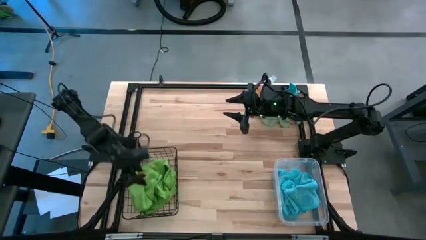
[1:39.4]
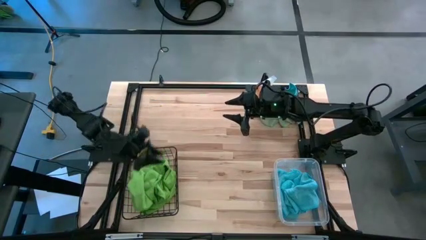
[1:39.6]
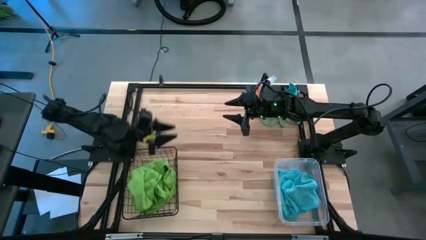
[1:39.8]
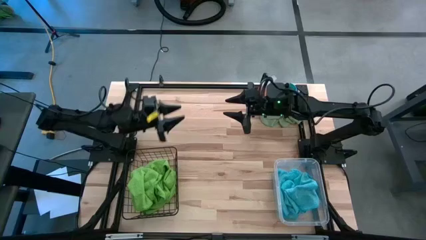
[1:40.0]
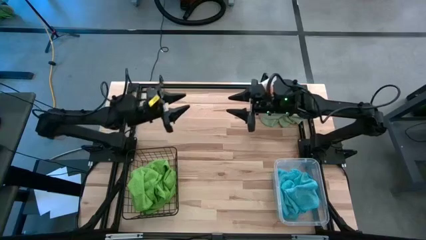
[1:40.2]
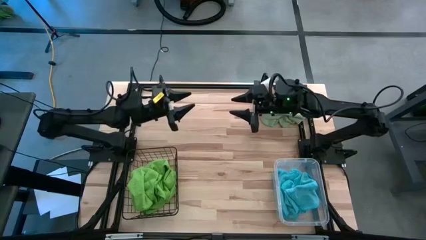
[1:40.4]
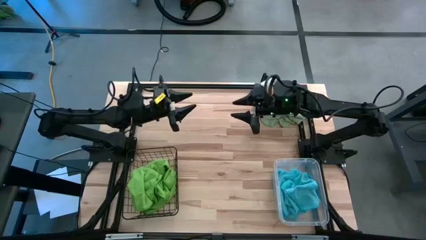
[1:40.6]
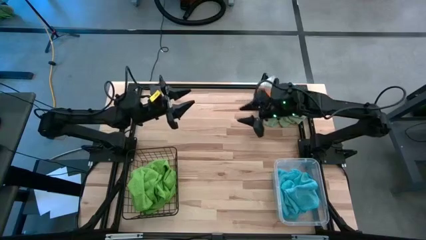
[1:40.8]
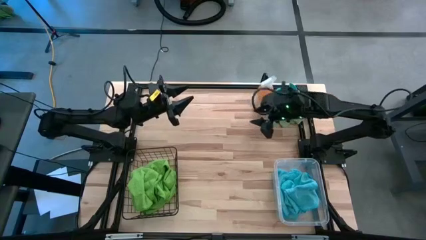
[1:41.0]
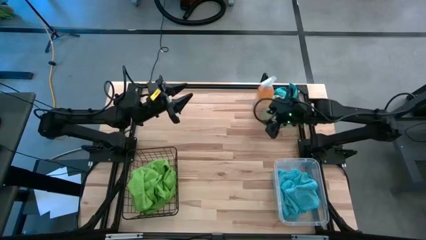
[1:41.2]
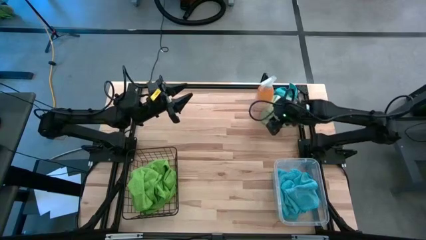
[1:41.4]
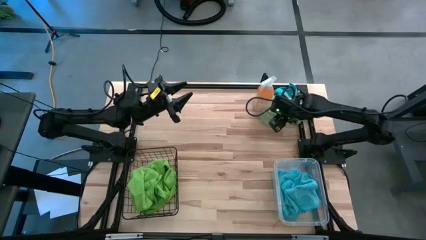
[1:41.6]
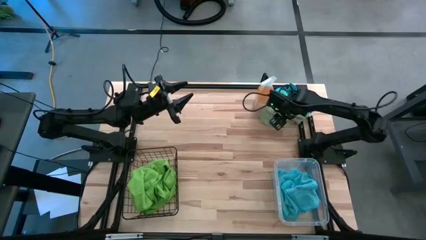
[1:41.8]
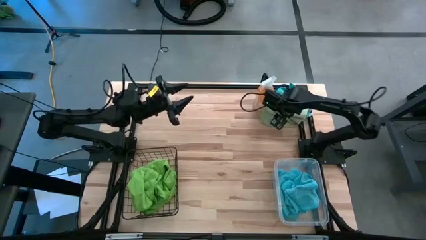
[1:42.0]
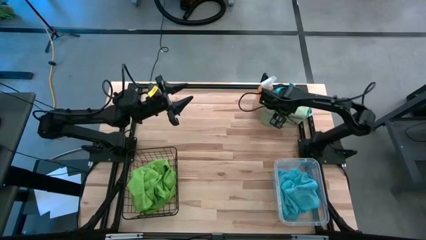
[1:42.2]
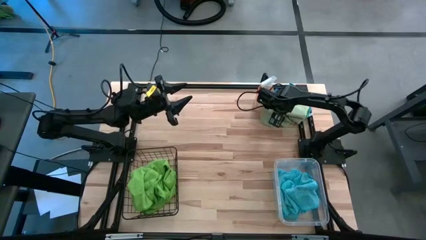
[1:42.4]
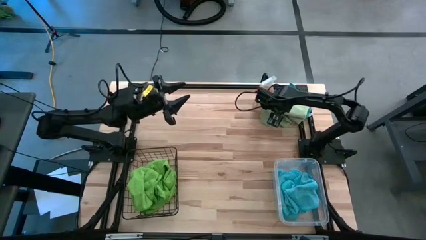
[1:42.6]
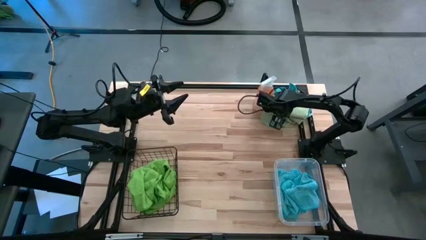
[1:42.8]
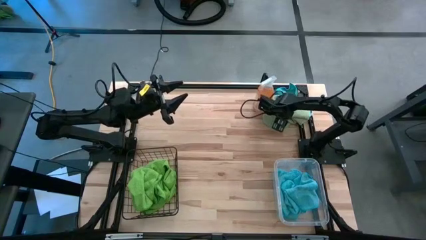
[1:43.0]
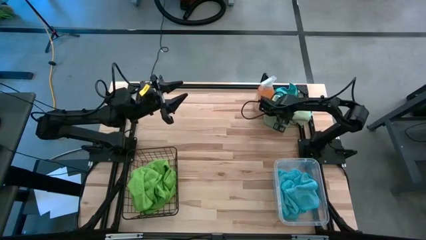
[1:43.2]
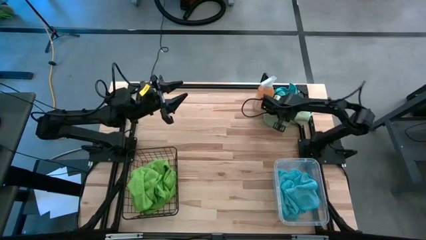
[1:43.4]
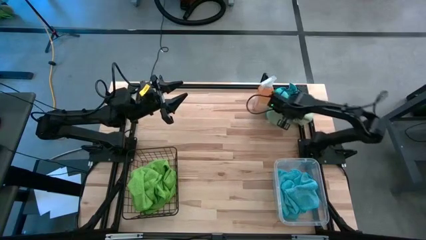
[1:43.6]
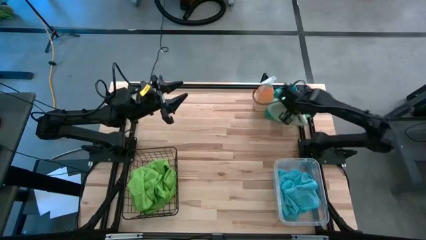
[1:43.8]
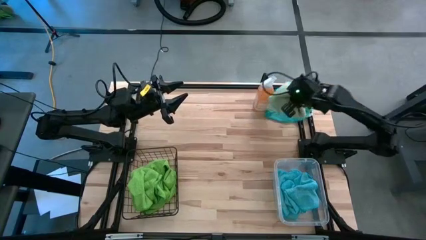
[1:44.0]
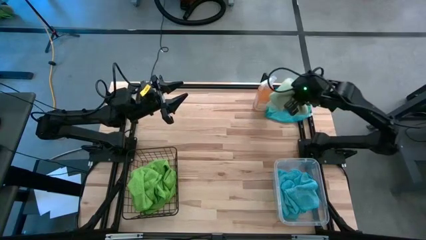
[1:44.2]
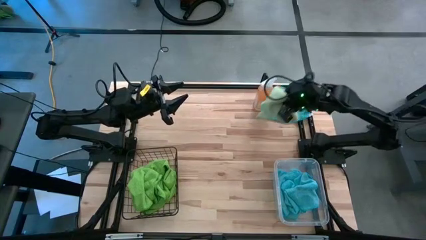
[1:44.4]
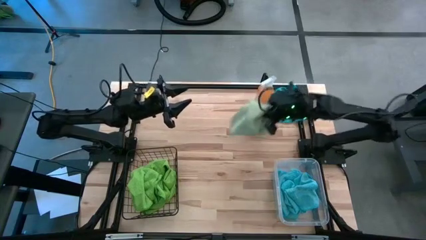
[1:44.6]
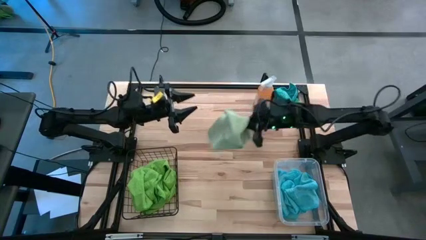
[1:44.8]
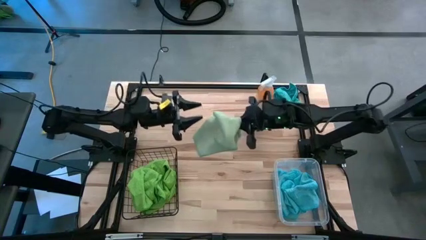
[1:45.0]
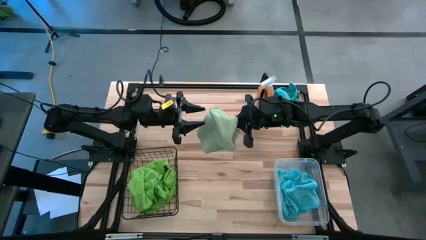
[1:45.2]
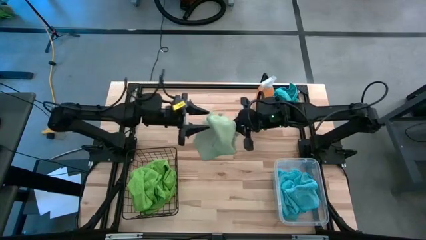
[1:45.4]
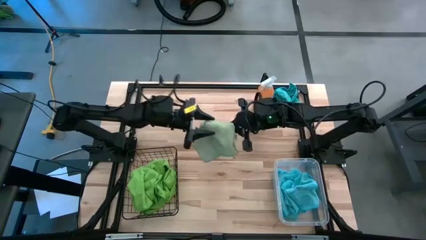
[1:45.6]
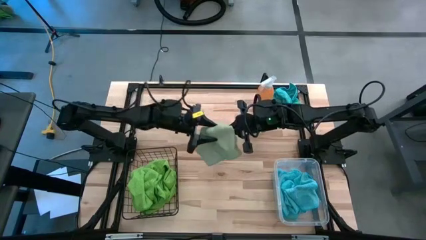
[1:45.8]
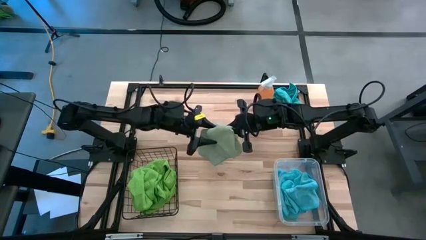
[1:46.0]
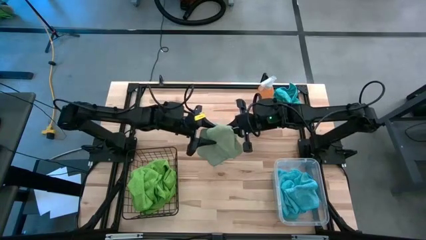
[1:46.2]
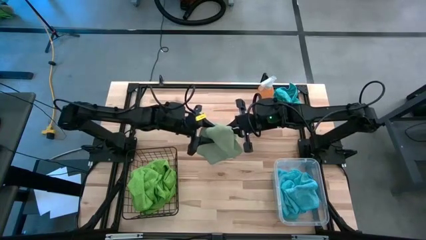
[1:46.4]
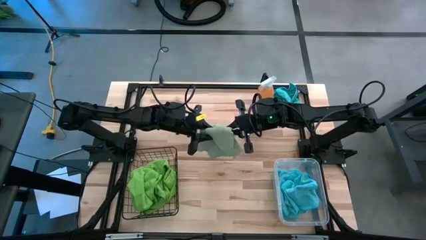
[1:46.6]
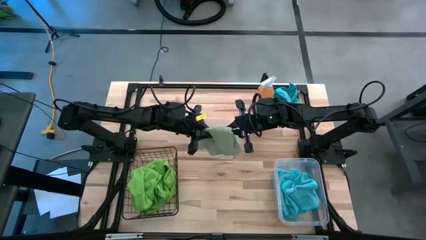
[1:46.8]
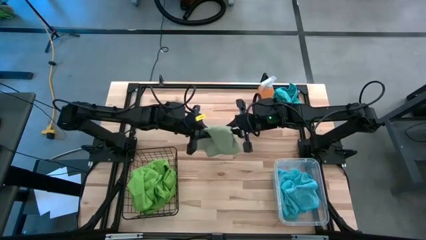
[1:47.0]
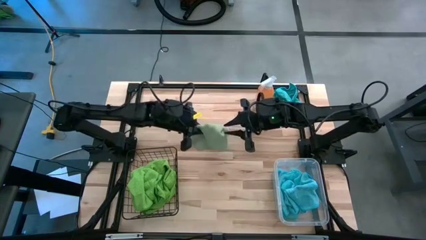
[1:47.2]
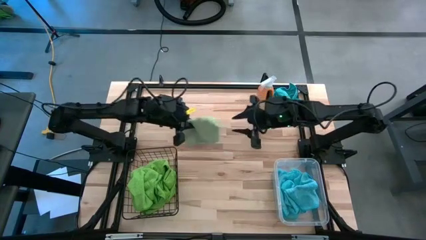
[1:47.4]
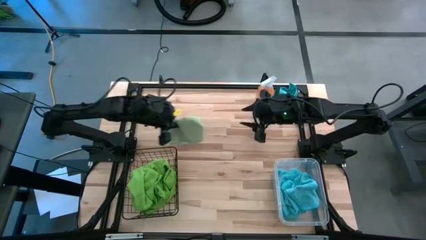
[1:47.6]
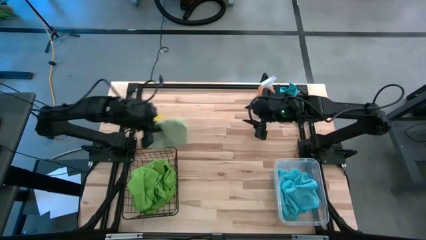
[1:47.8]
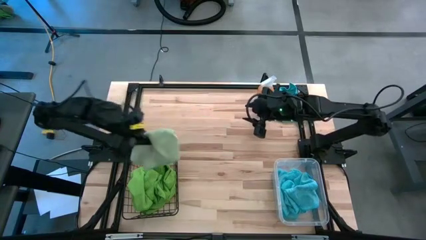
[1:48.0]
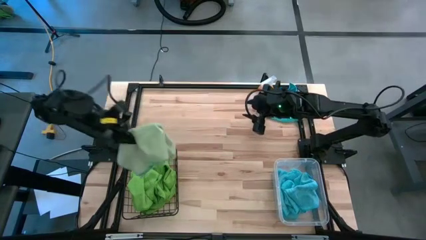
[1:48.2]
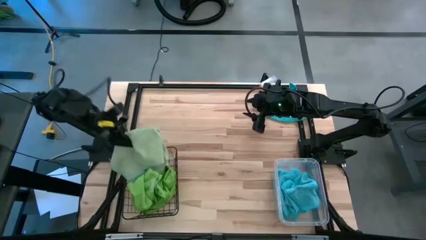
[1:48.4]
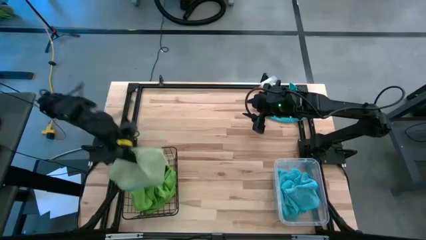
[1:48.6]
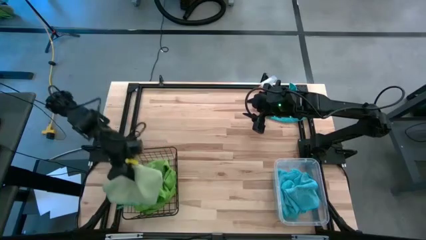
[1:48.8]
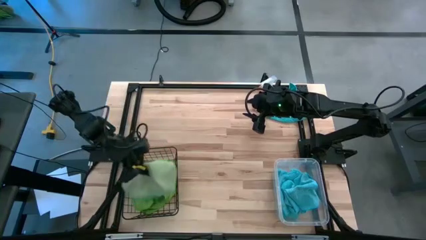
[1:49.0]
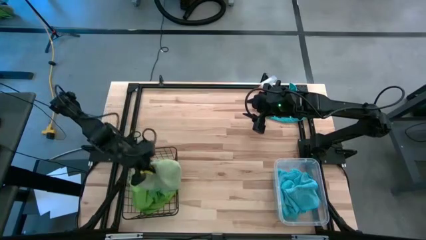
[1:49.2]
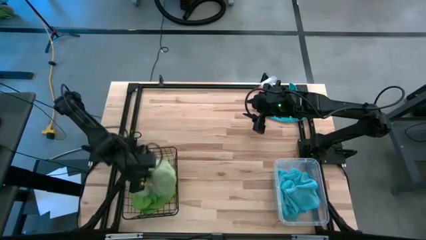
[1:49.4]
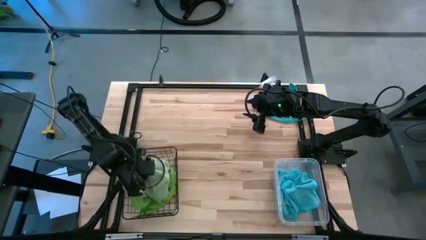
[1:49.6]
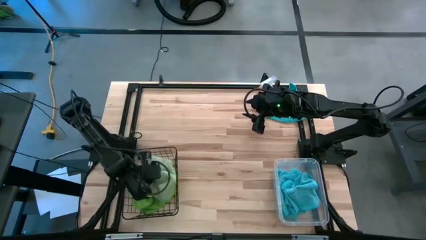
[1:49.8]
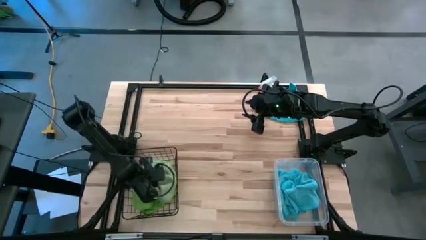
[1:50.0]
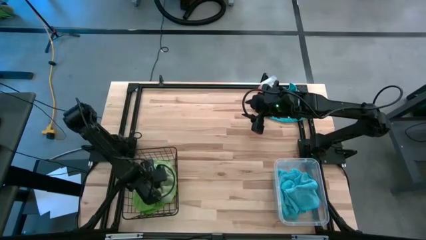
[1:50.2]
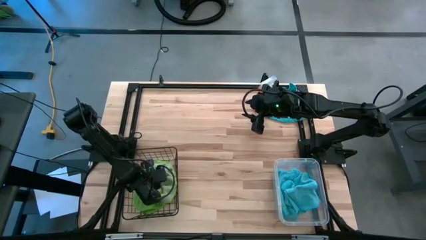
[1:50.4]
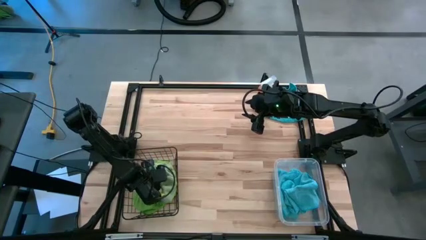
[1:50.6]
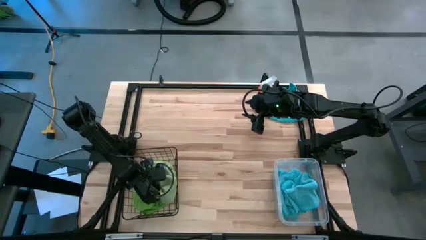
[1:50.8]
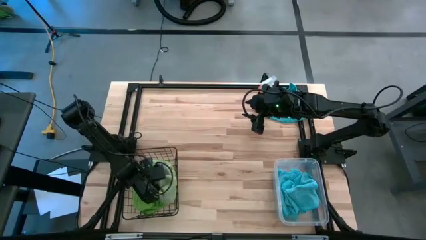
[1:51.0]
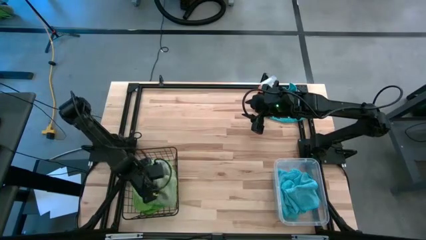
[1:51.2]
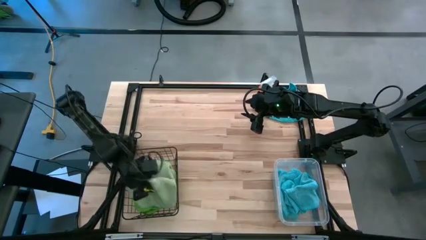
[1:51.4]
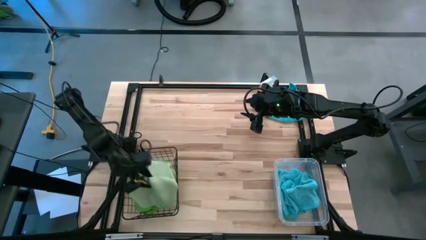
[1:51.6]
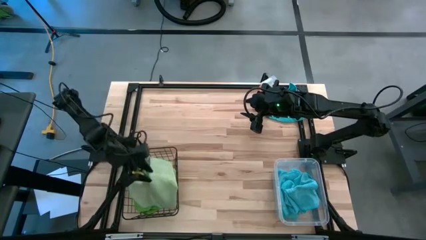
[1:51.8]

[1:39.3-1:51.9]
Task: Sort microfiber towel by color & place in baskets
Put the green microfiber cloth into the black wire basket
